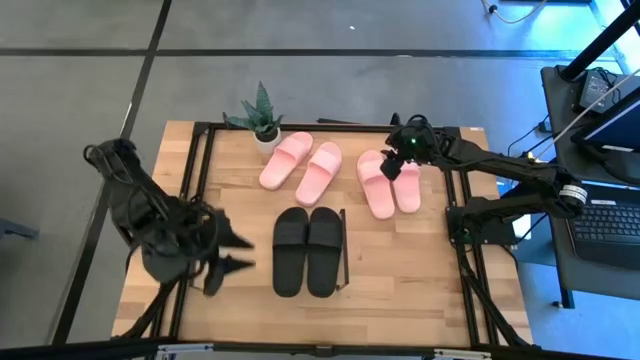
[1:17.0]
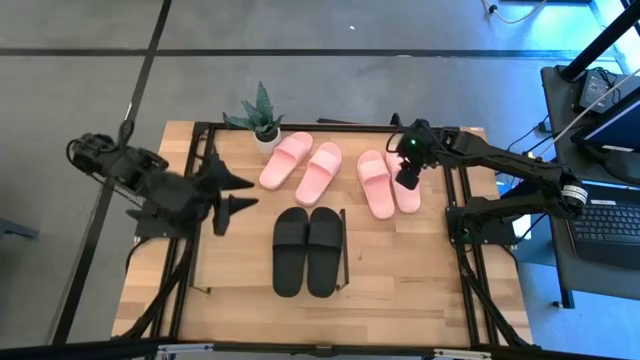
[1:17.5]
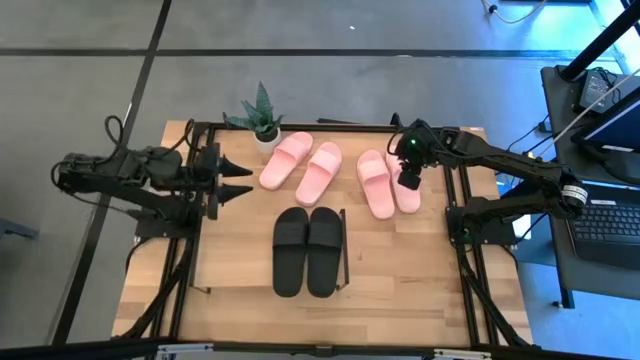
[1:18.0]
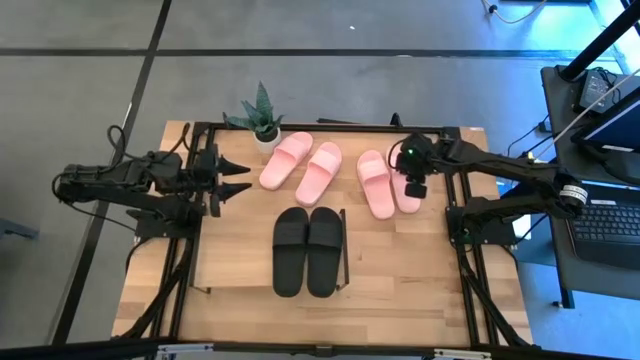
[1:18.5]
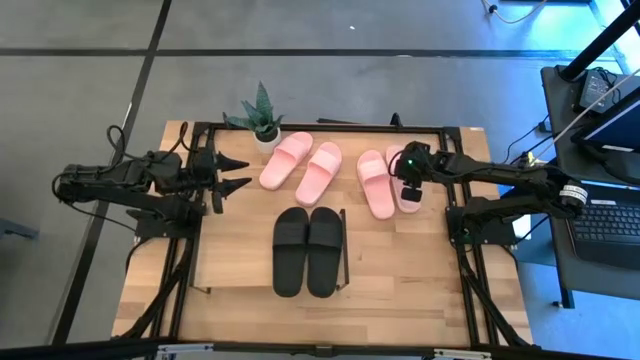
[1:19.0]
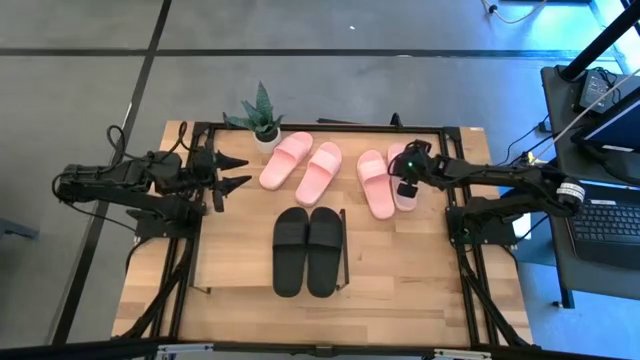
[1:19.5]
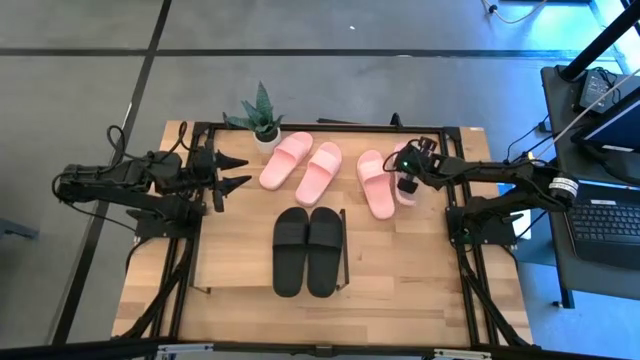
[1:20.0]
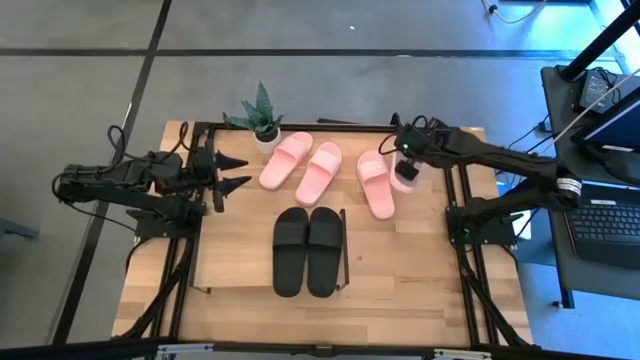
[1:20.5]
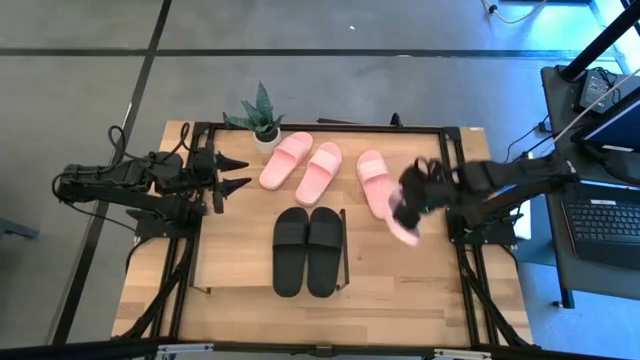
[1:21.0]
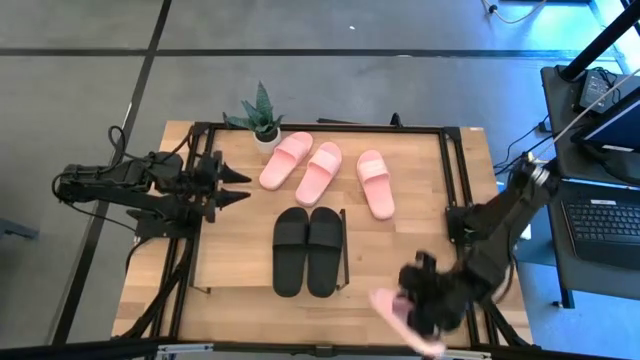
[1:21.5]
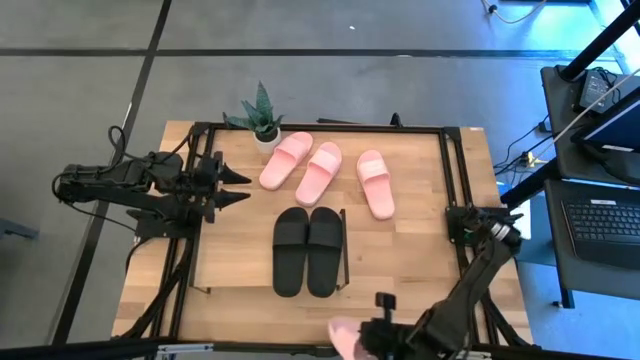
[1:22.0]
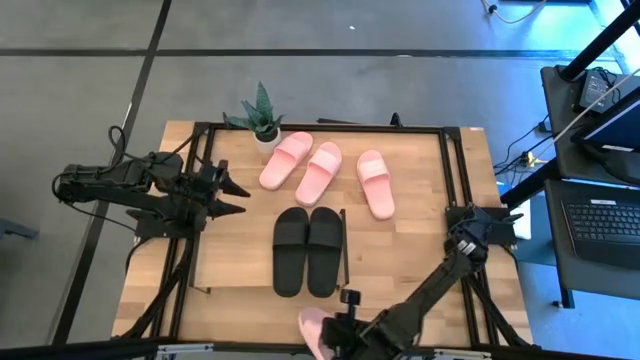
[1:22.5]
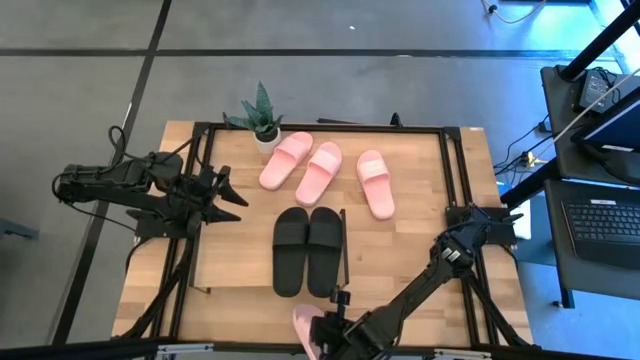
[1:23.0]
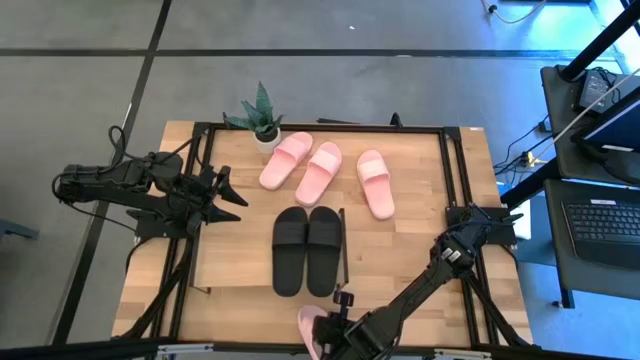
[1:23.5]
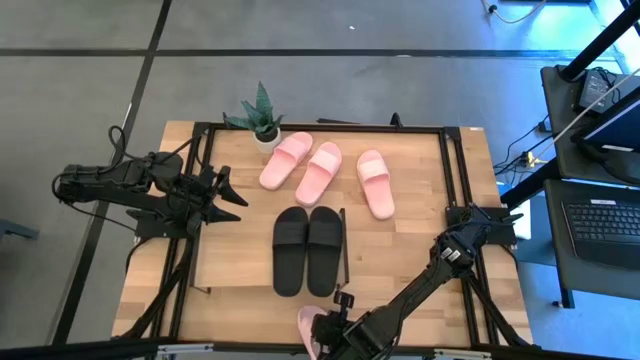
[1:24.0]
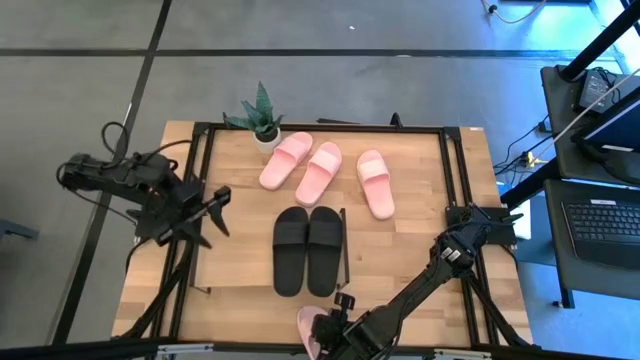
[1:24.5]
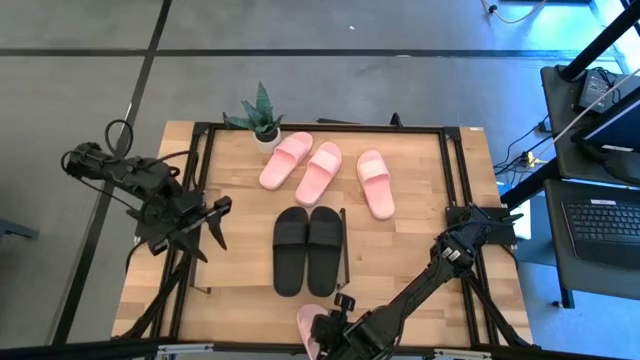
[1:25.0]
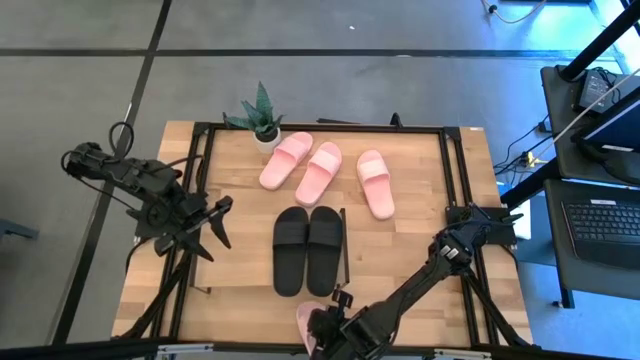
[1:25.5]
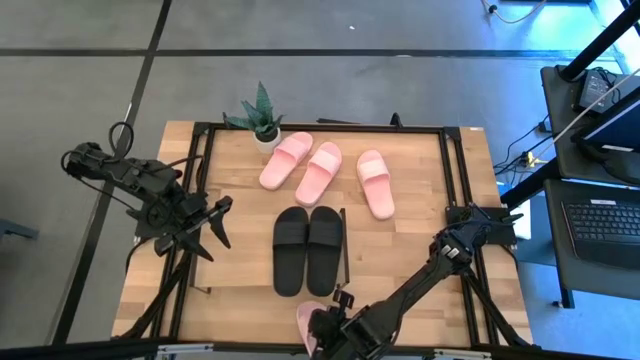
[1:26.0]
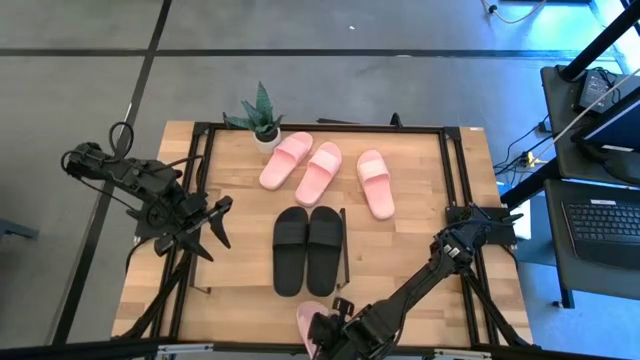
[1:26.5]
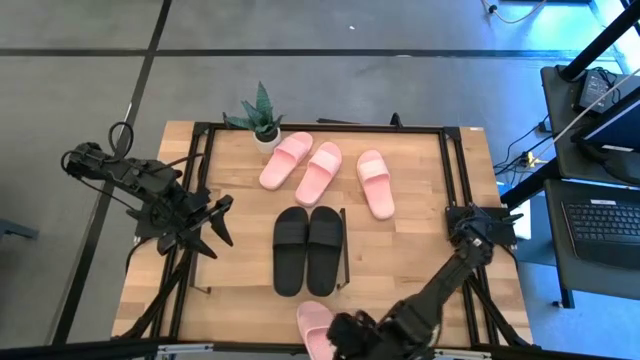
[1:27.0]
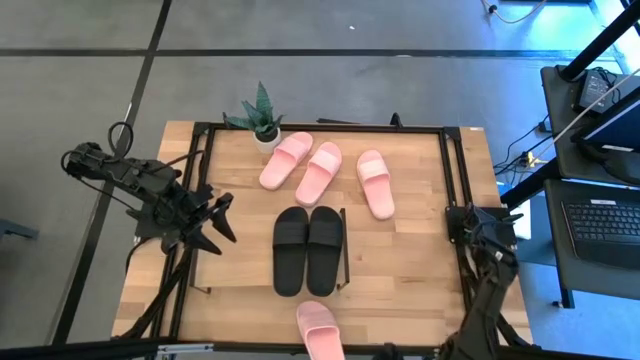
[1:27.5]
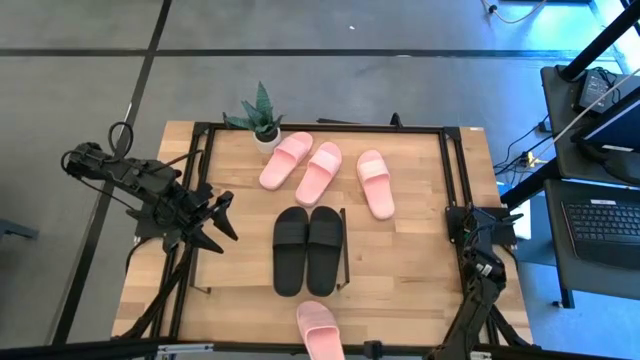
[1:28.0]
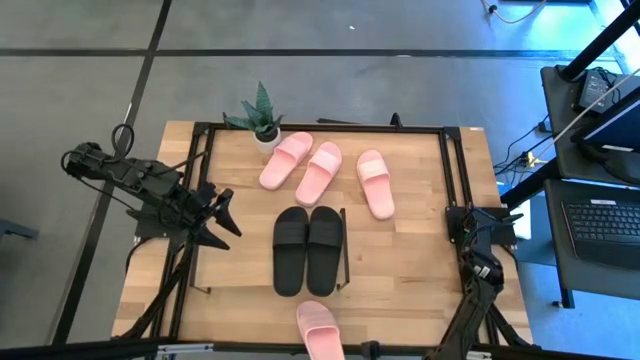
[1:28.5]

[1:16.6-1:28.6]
Task: Pick and place slides into the shelf
Put the pink slide under the shelf

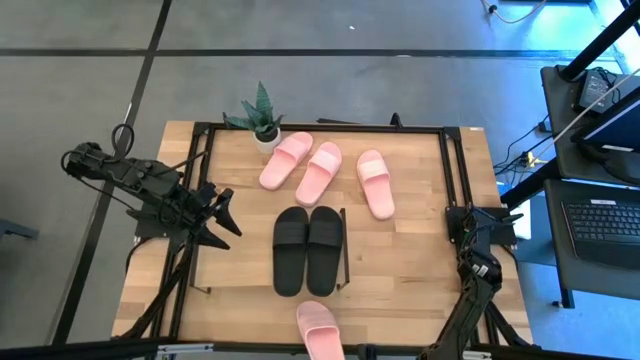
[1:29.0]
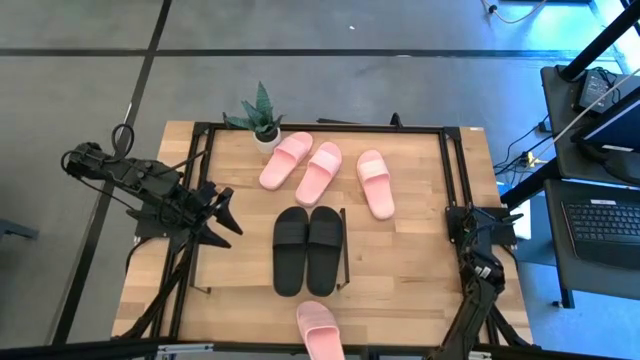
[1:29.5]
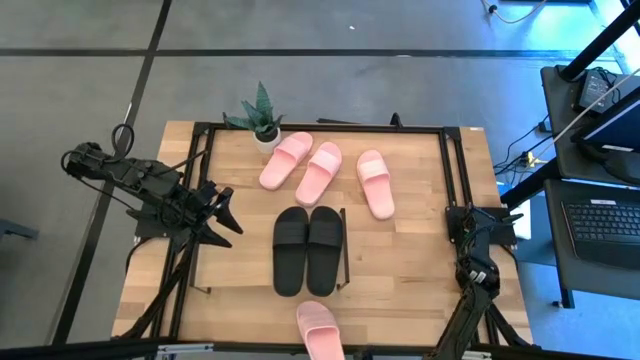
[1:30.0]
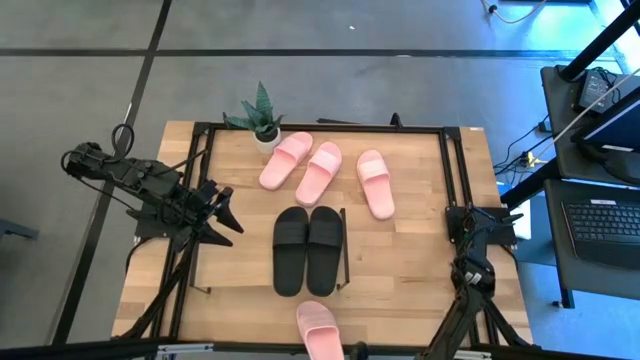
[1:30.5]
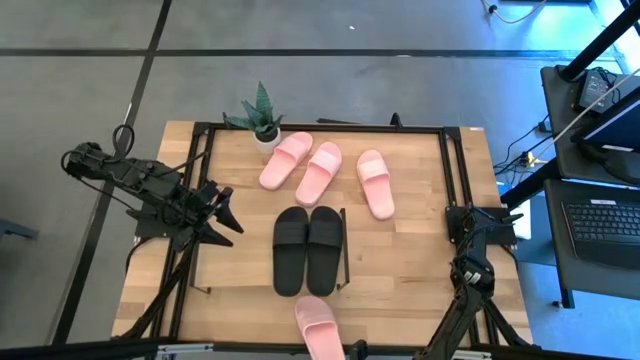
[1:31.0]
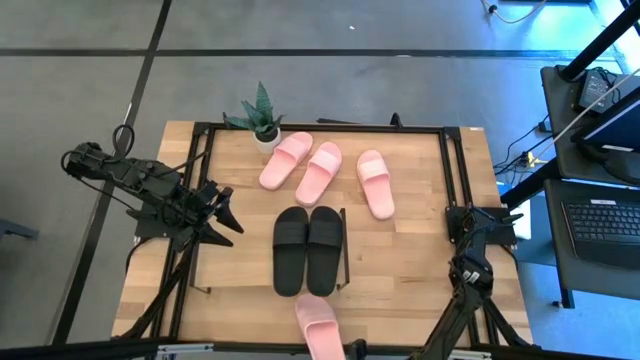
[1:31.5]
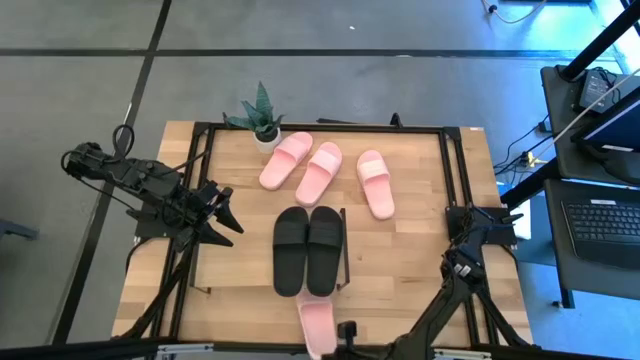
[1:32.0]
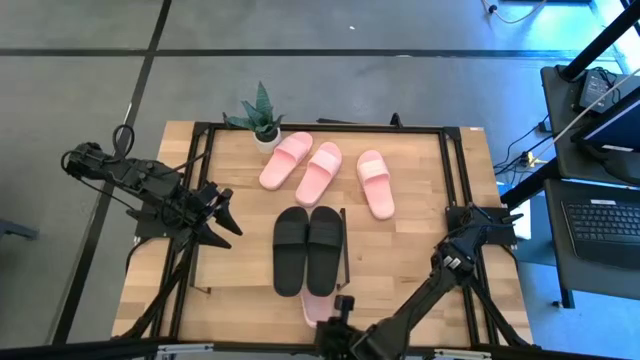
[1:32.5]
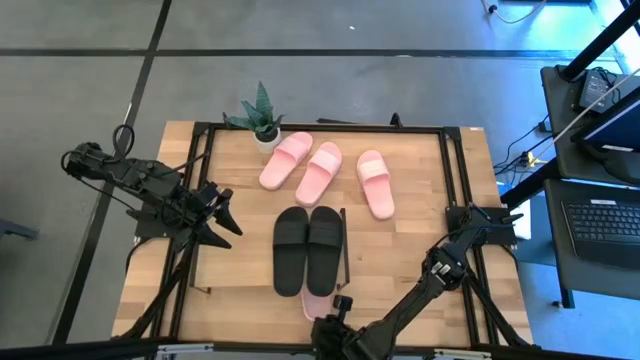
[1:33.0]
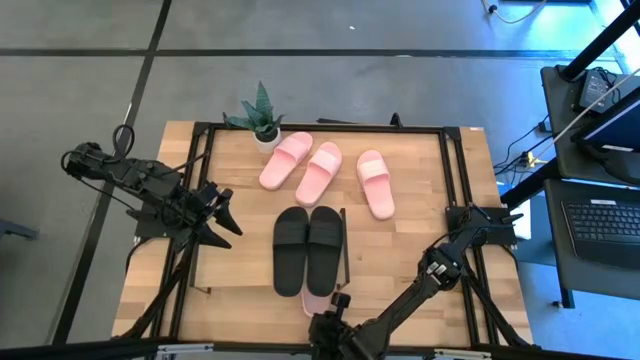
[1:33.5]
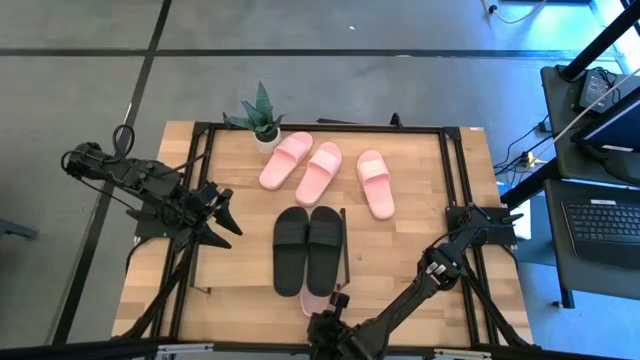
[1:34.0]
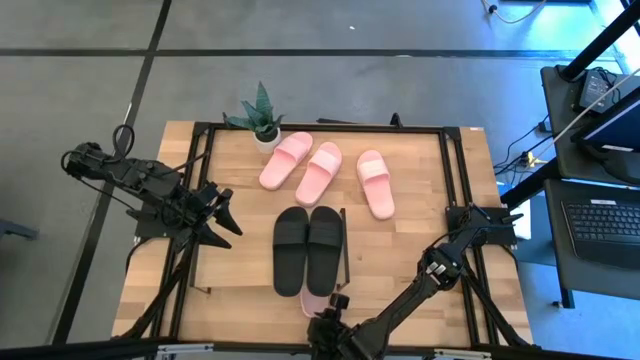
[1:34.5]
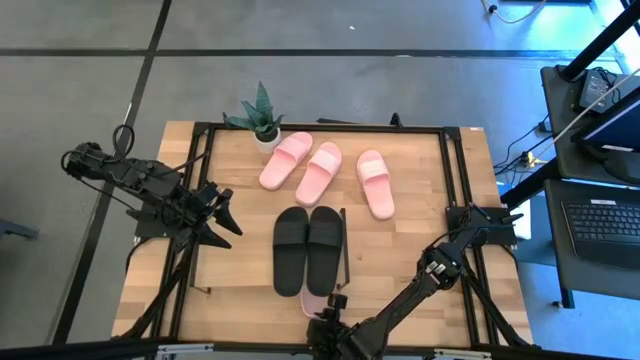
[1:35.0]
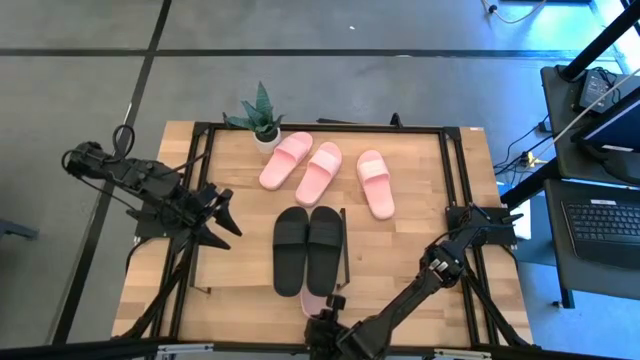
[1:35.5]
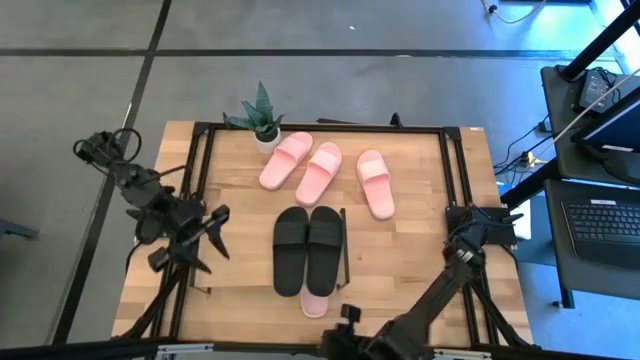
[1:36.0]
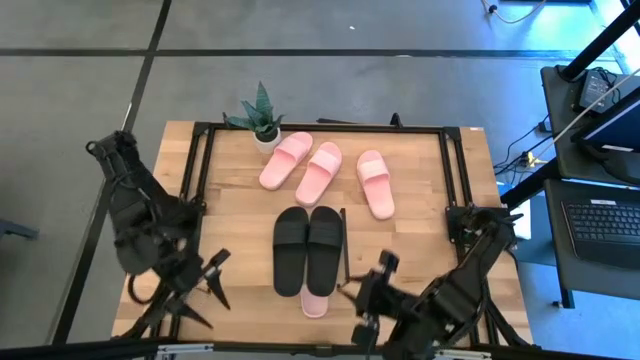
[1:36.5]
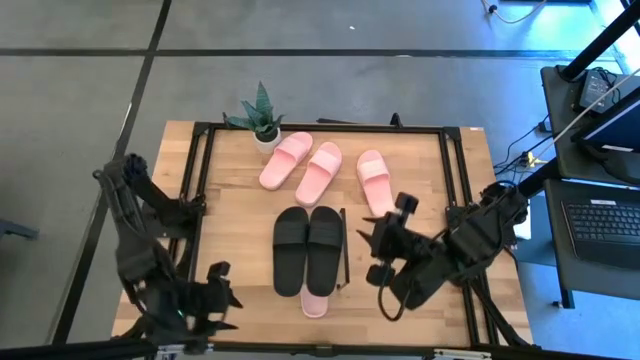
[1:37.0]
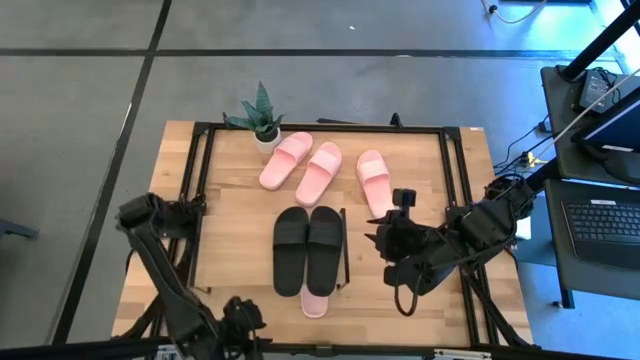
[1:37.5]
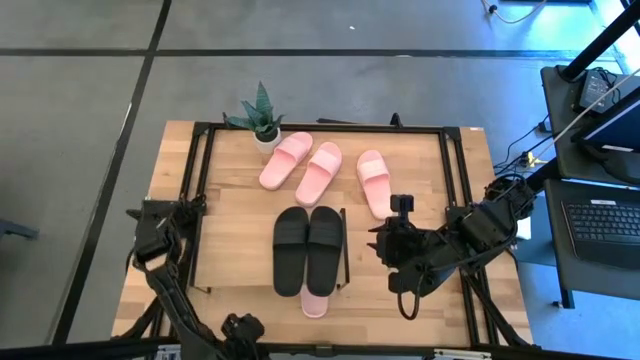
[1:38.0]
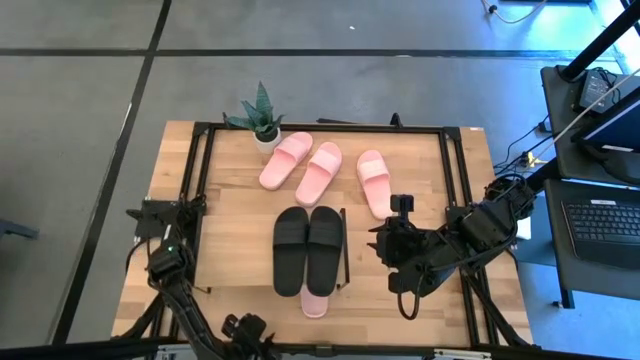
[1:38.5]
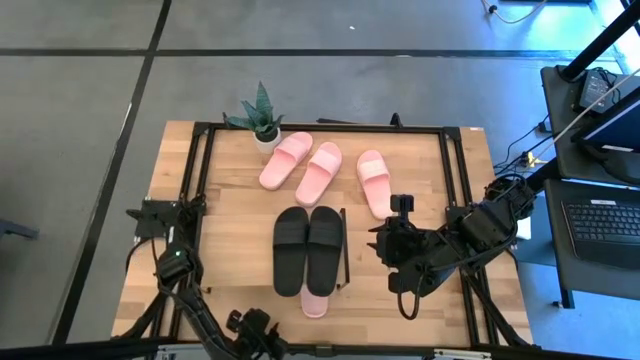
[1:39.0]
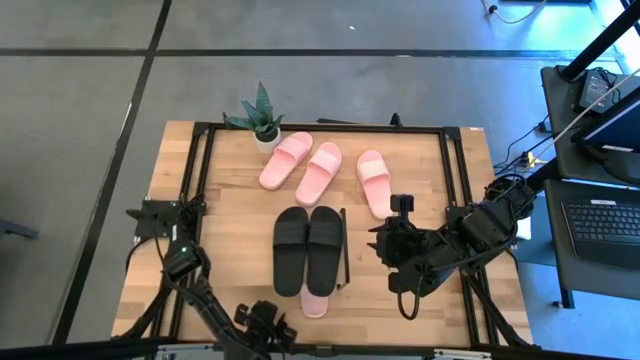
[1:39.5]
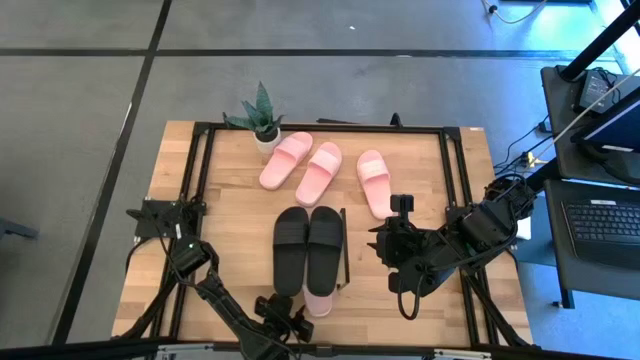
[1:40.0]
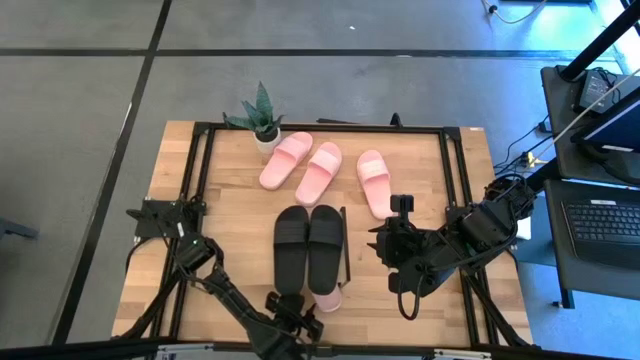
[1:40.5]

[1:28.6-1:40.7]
Put the pink slide under the shelf
